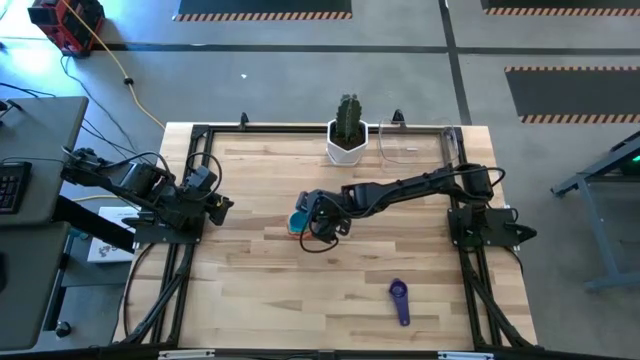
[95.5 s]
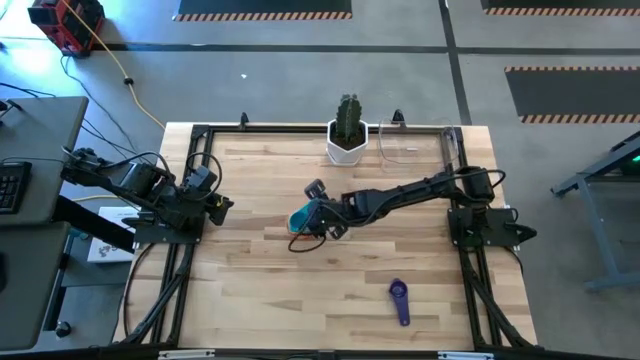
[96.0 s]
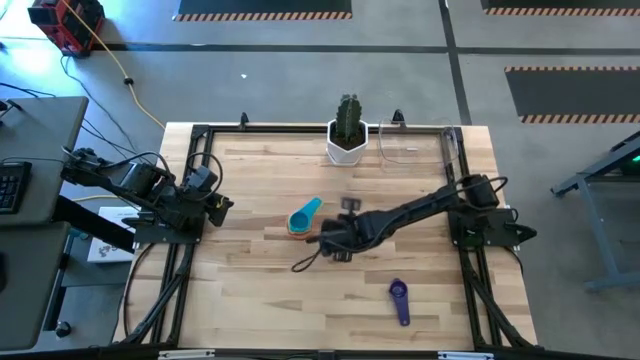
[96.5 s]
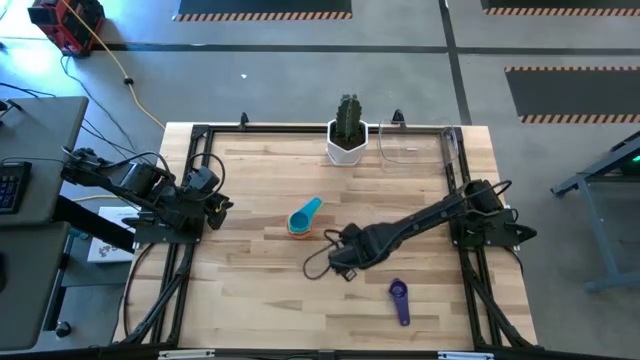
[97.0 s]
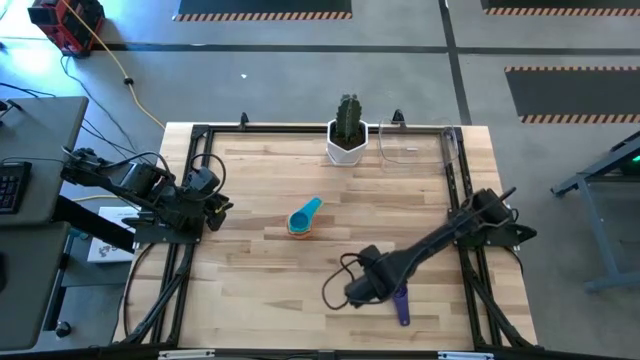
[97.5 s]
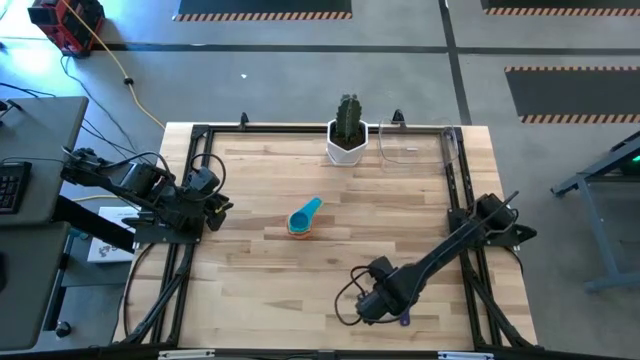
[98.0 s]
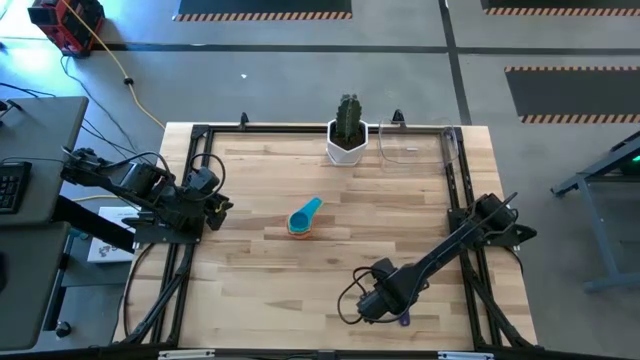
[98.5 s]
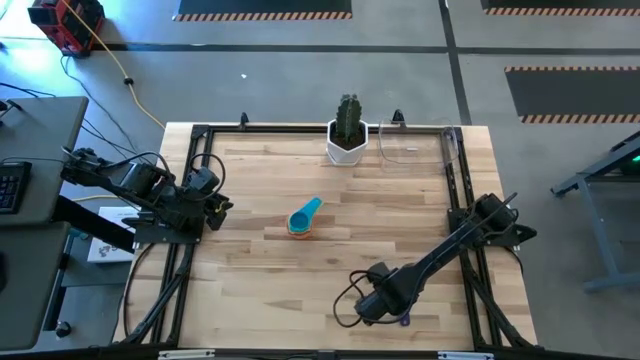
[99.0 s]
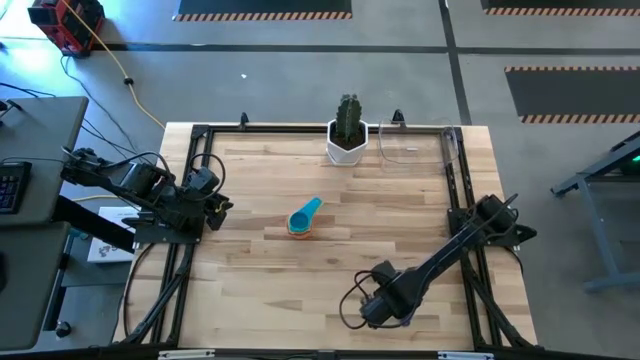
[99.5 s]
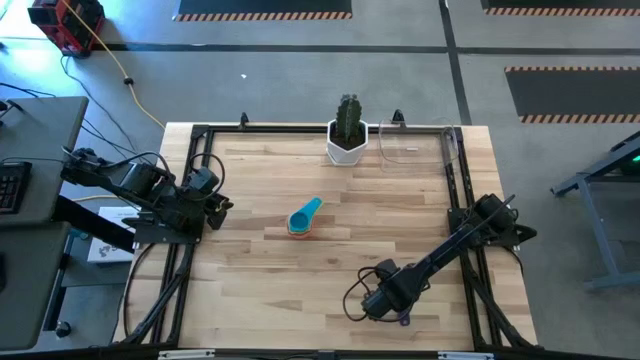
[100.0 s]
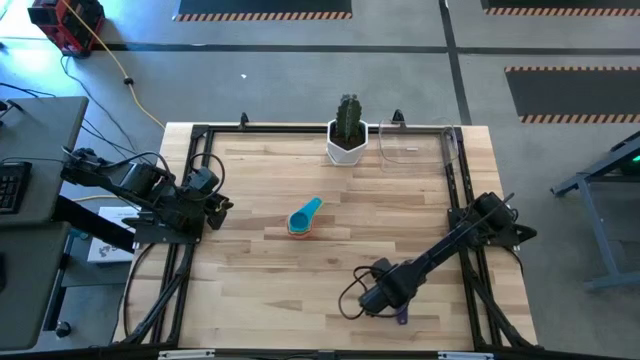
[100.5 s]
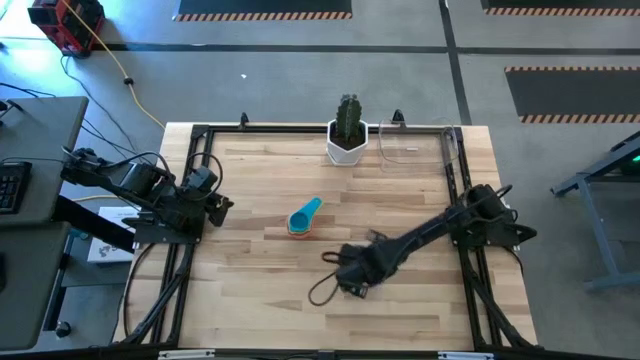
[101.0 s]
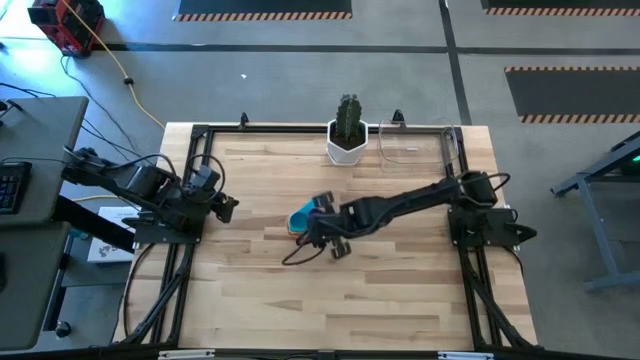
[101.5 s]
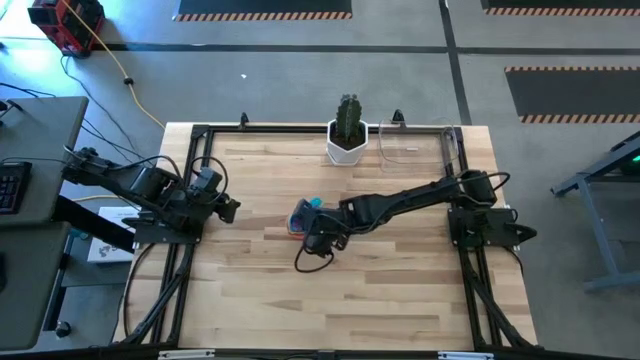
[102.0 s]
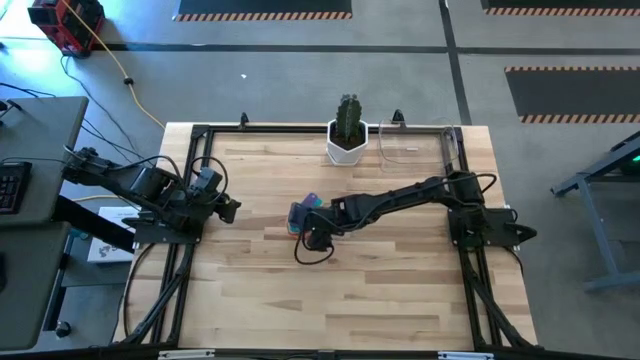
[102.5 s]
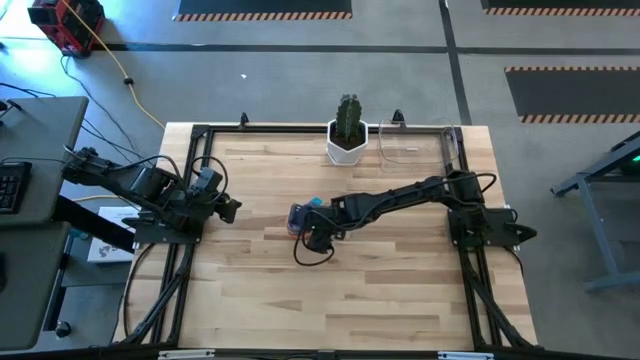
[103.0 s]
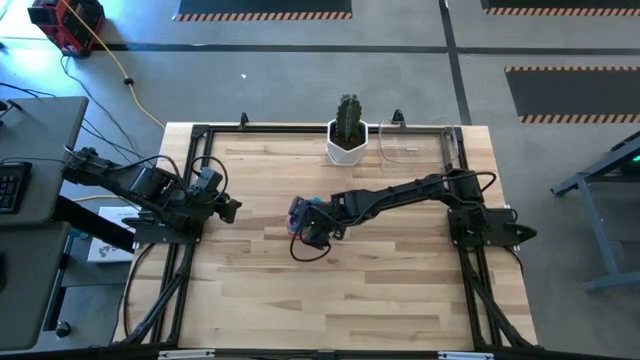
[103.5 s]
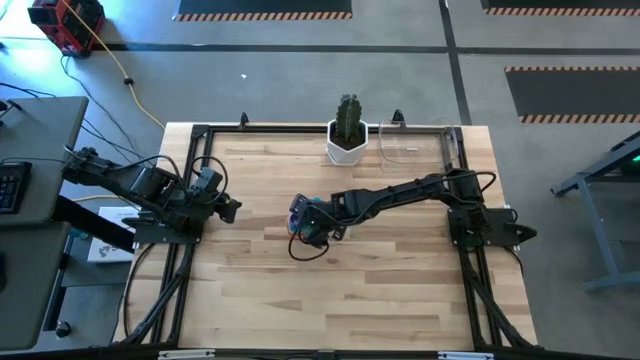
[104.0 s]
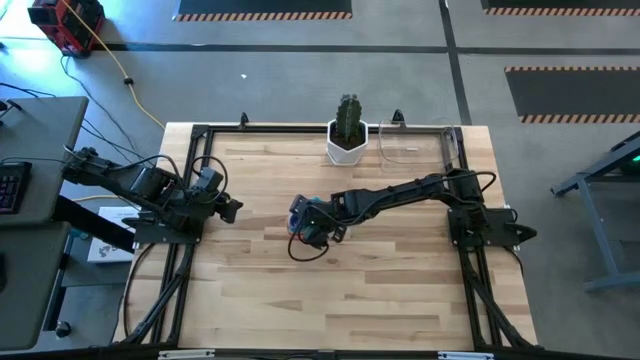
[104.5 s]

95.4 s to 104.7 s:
Task: Nest measuring cups in basket
Stack the violet measuring cup on top of the light blue measuring cup

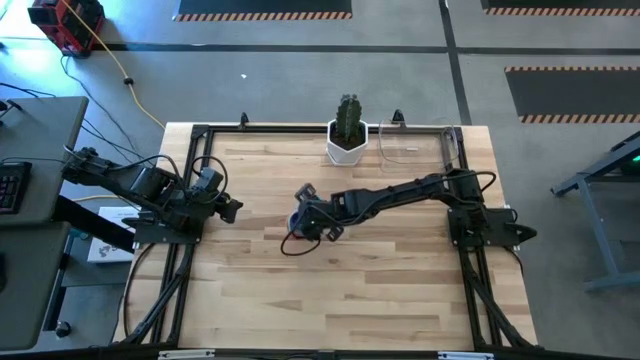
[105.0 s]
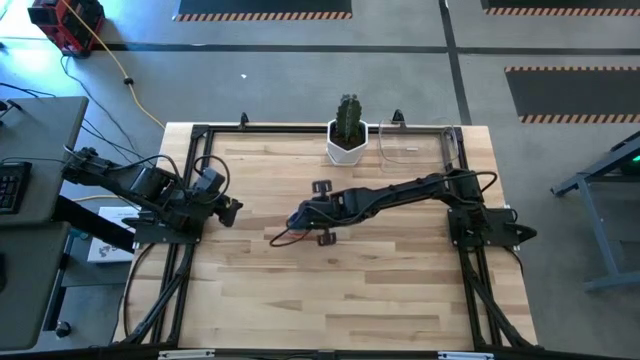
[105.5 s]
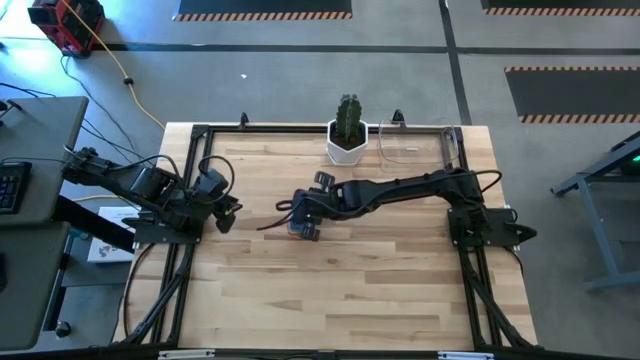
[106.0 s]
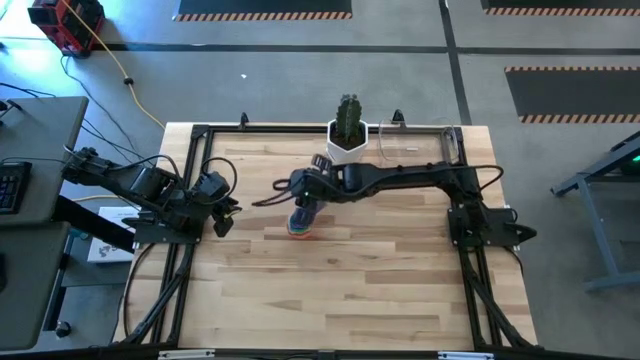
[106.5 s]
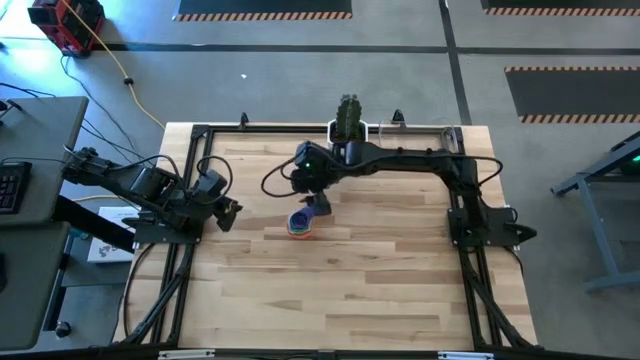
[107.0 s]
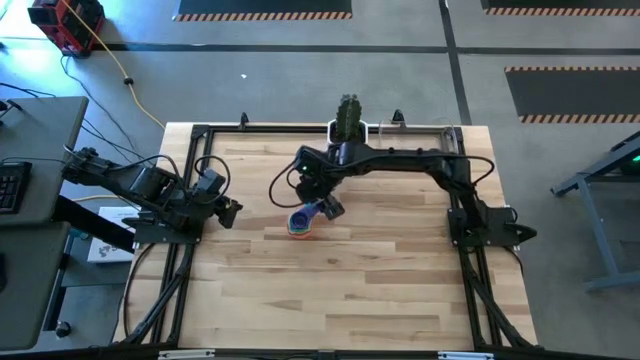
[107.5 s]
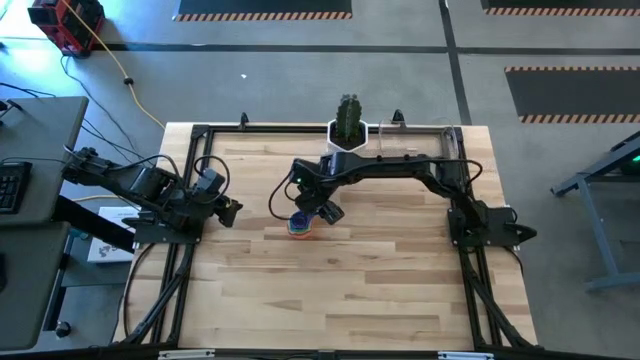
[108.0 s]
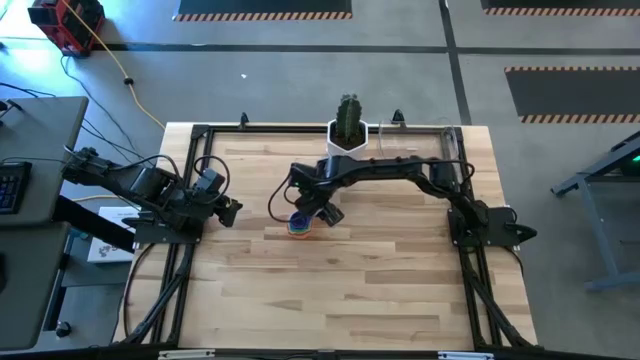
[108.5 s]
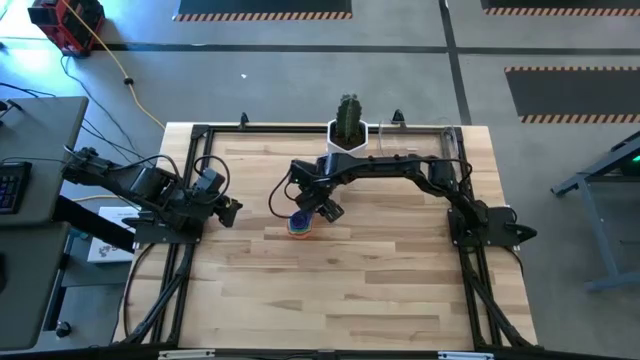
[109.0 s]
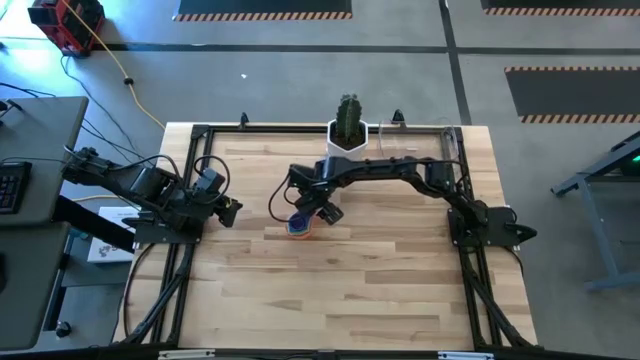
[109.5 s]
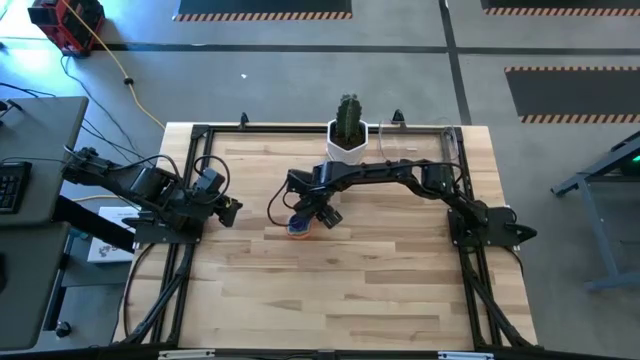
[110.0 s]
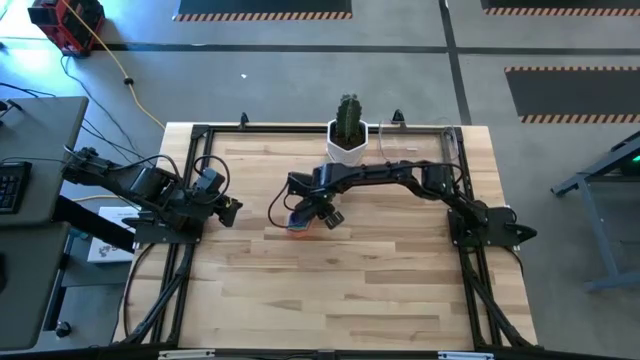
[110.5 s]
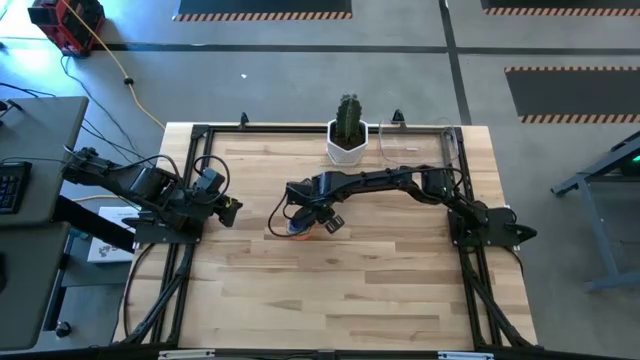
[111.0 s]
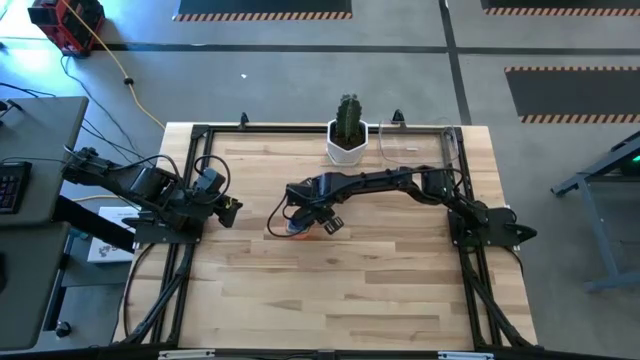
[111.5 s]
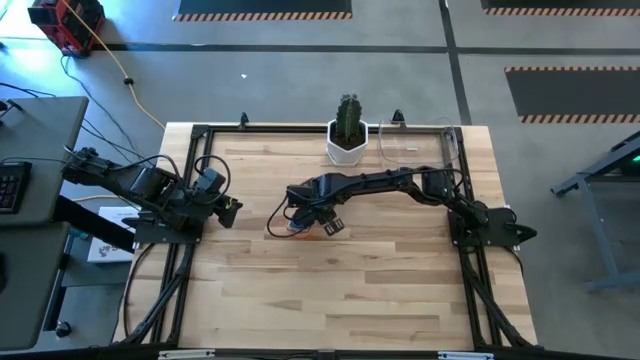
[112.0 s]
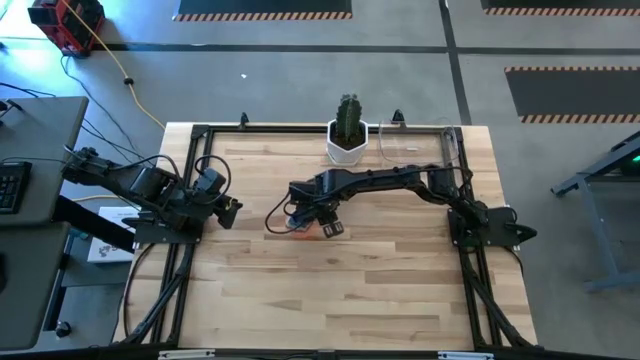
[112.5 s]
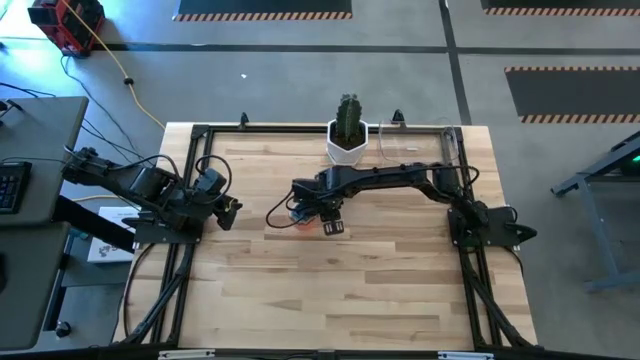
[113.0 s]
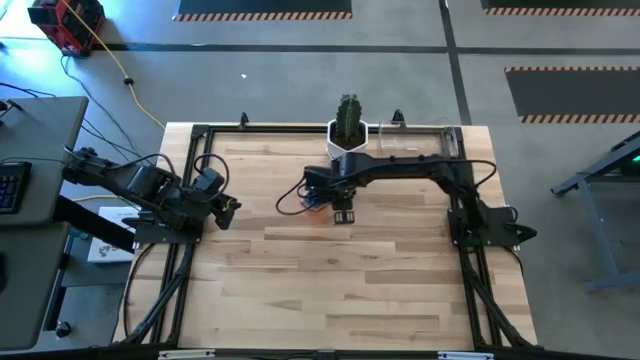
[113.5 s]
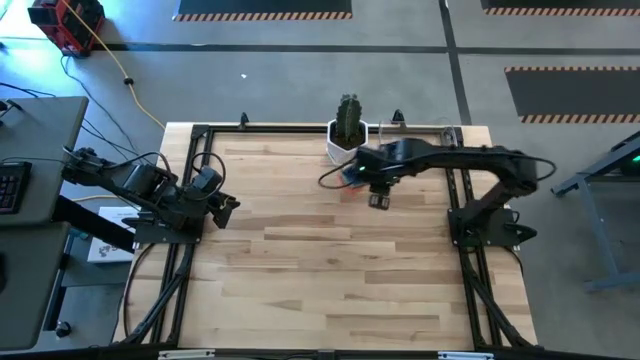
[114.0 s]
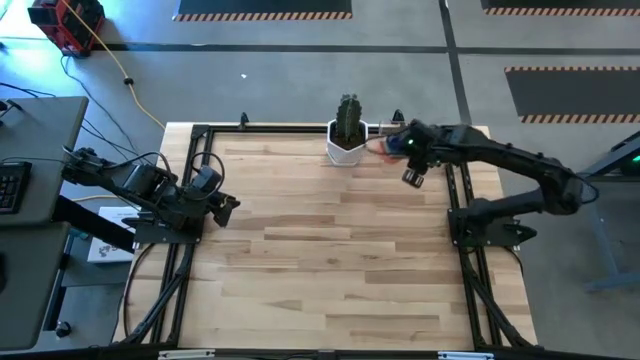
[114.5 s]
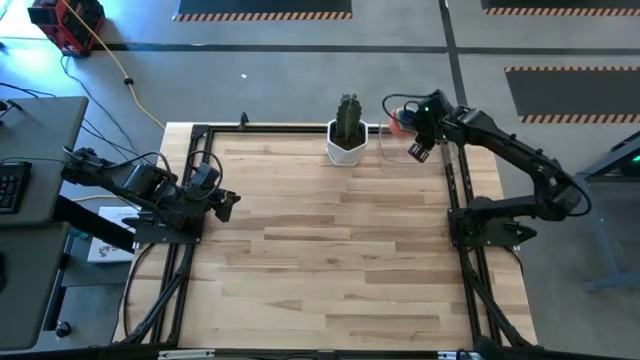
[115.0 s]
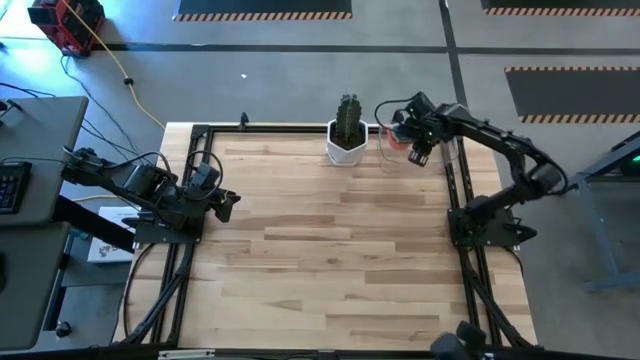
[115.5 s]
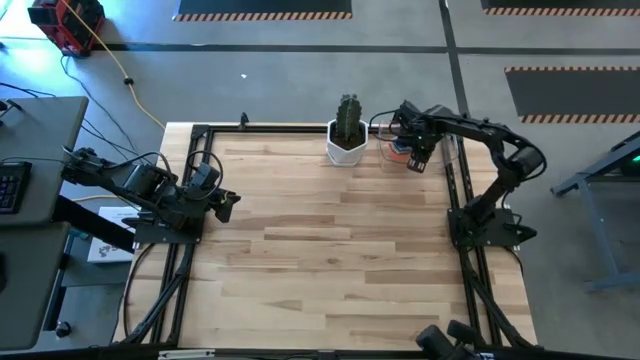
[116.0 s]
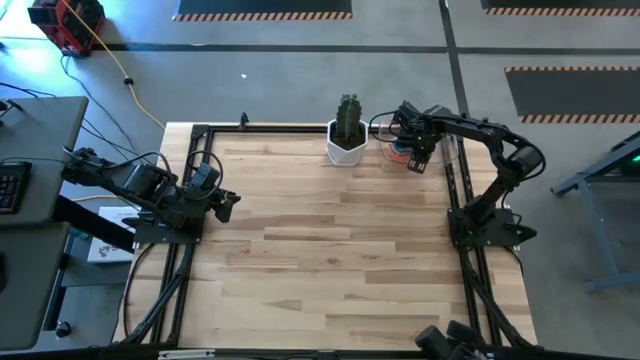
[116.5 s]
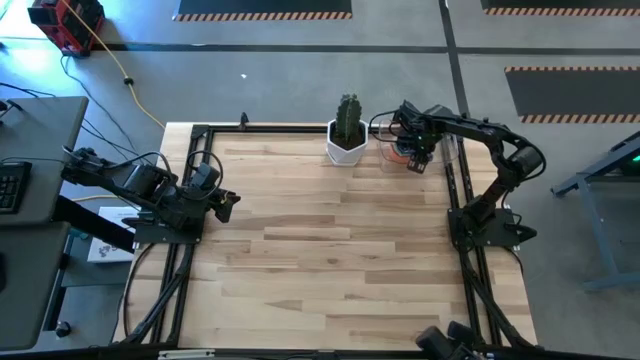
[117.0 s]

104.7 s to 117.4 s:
Put the stack of measuring cups into the transparent bin

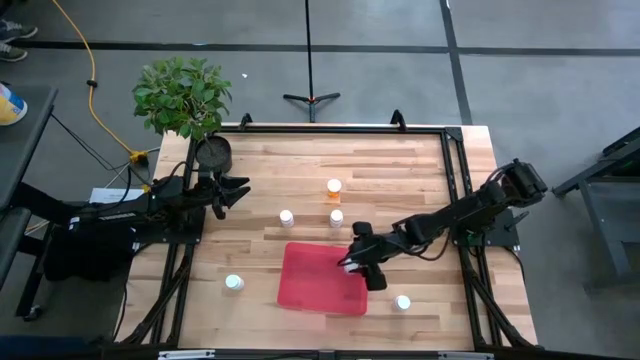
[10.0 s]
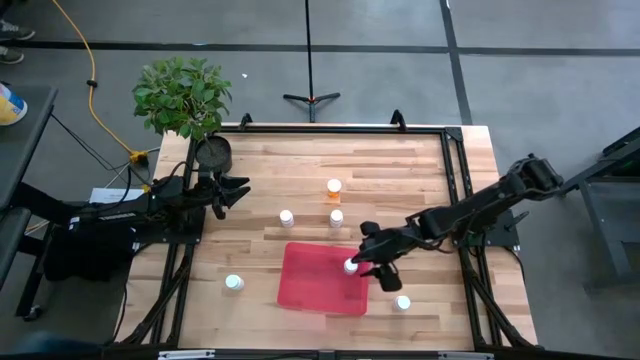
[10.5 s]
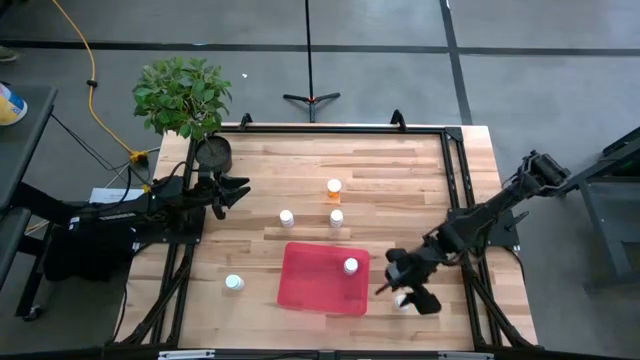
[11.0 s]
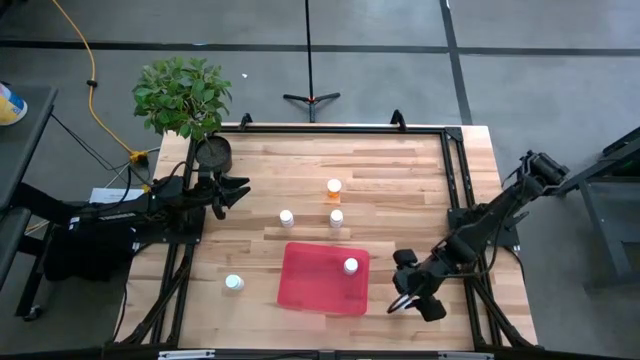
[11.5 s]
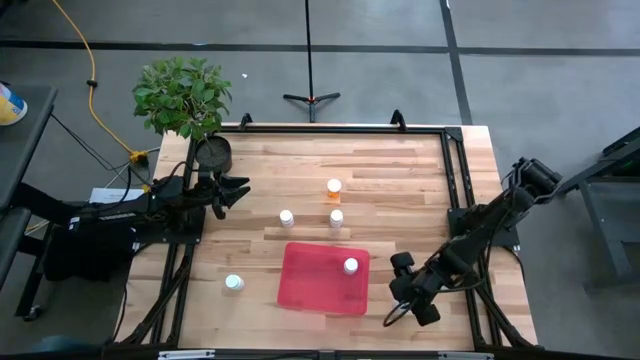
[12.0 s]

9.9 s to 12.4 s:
Task: Pick and place pill bottles into a basket
Put the white pill bottle into the bin
